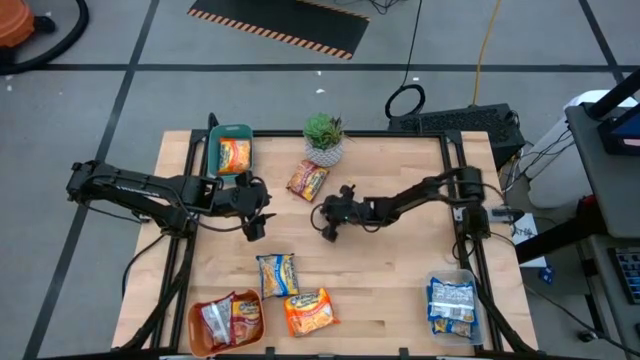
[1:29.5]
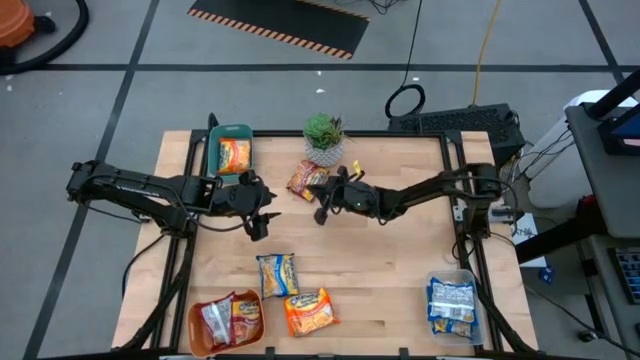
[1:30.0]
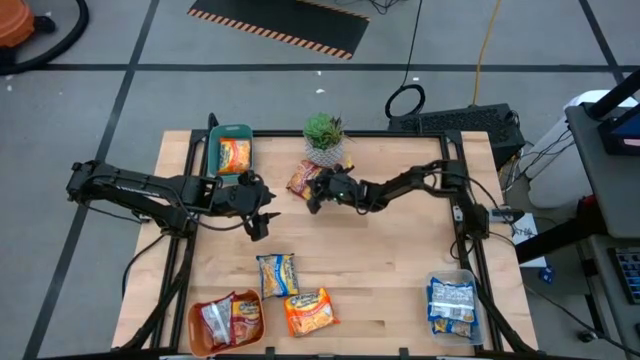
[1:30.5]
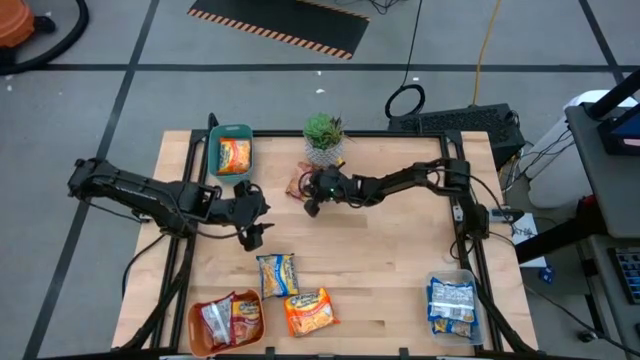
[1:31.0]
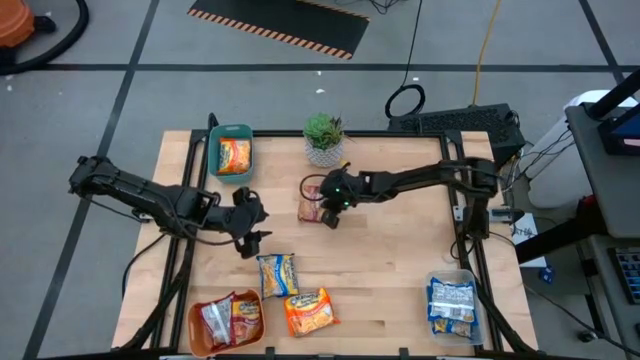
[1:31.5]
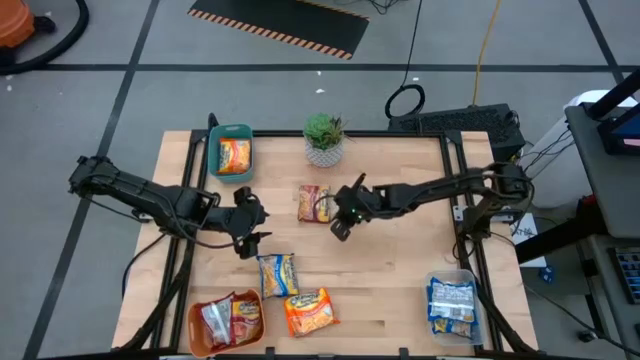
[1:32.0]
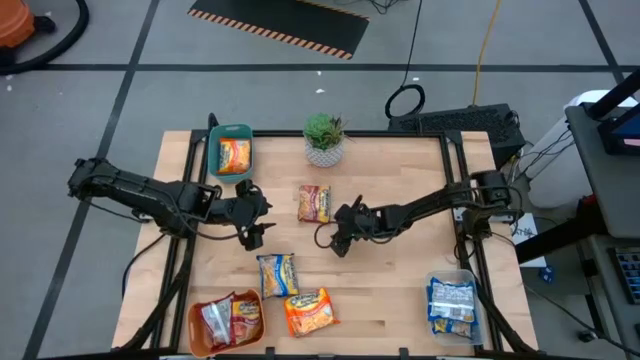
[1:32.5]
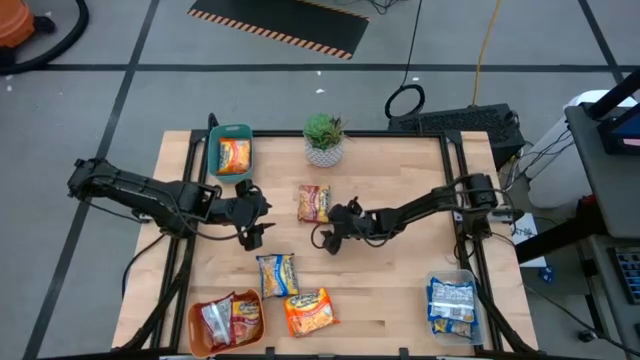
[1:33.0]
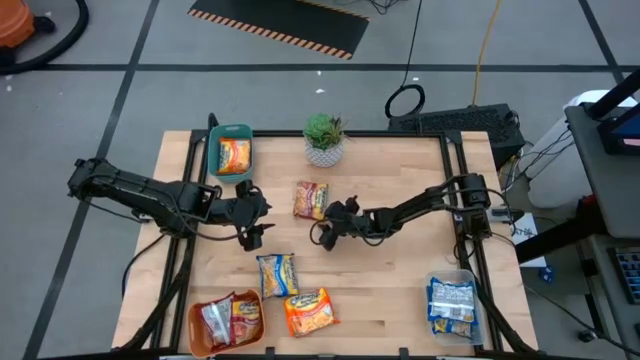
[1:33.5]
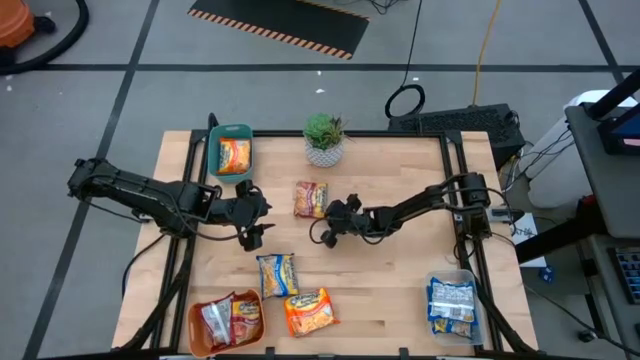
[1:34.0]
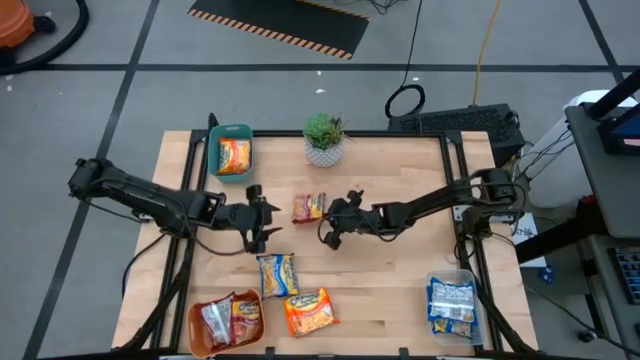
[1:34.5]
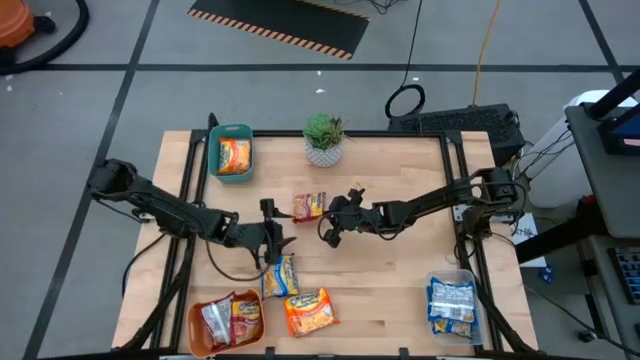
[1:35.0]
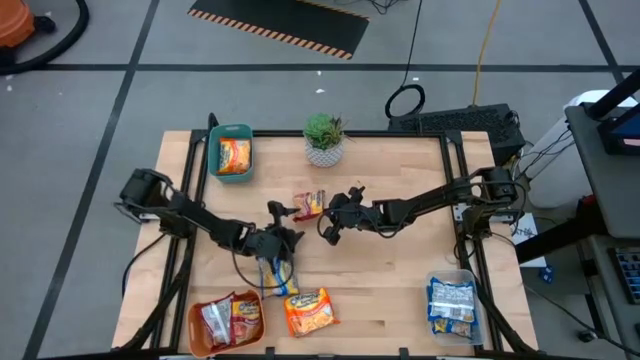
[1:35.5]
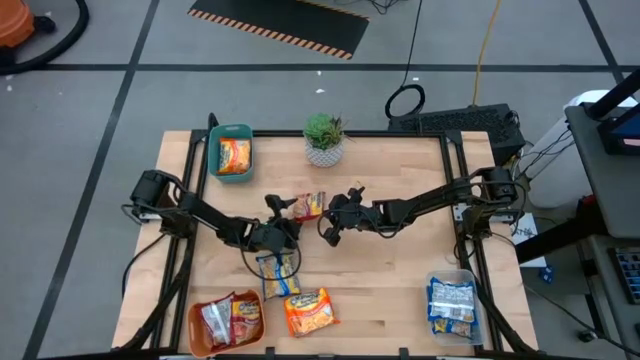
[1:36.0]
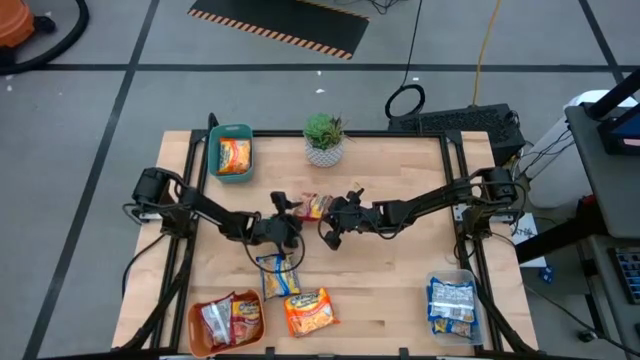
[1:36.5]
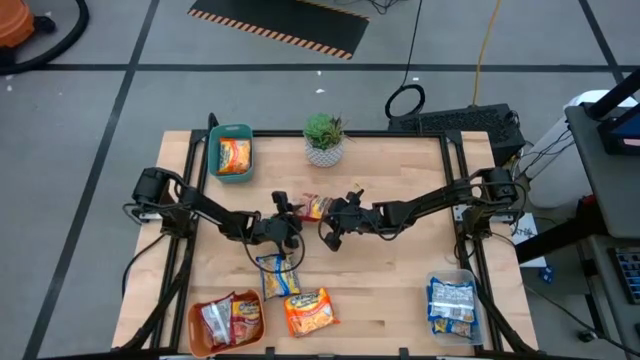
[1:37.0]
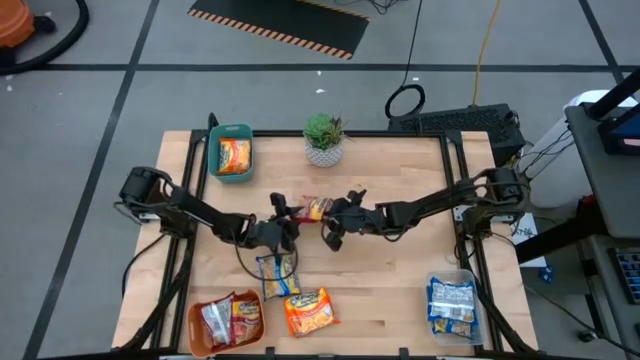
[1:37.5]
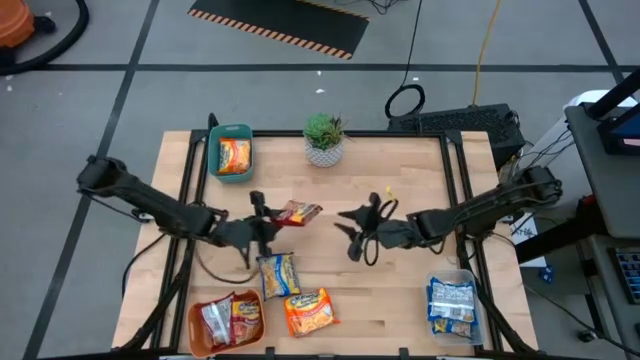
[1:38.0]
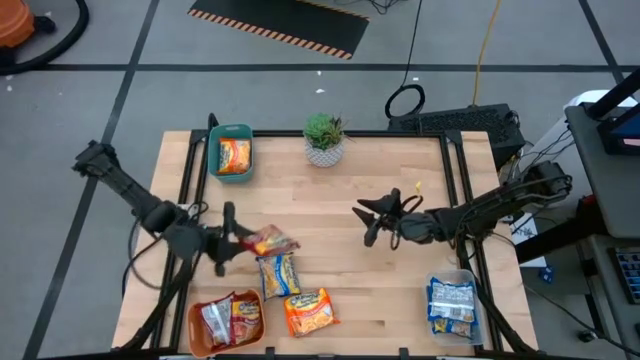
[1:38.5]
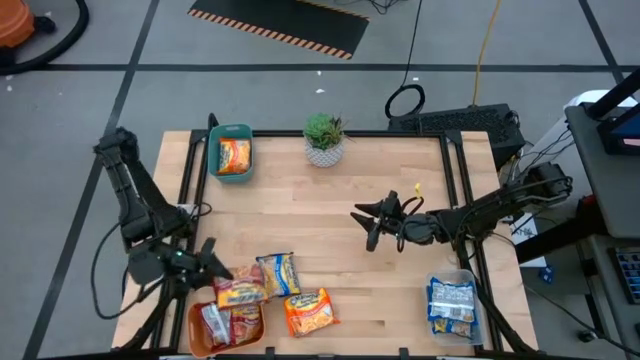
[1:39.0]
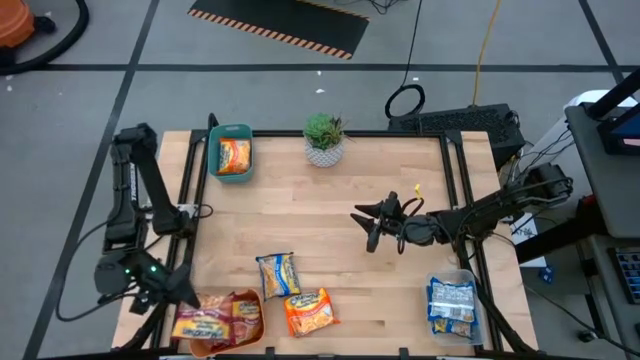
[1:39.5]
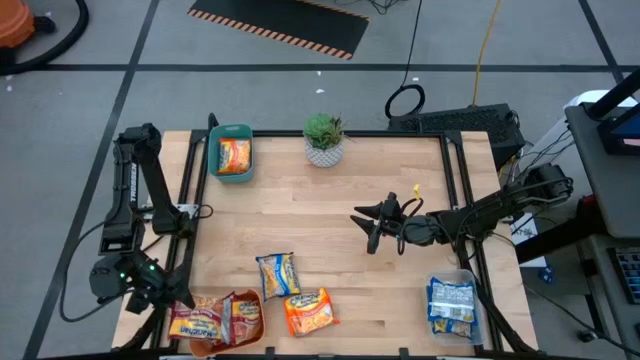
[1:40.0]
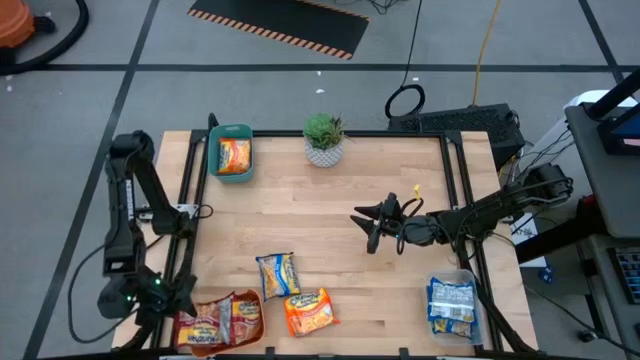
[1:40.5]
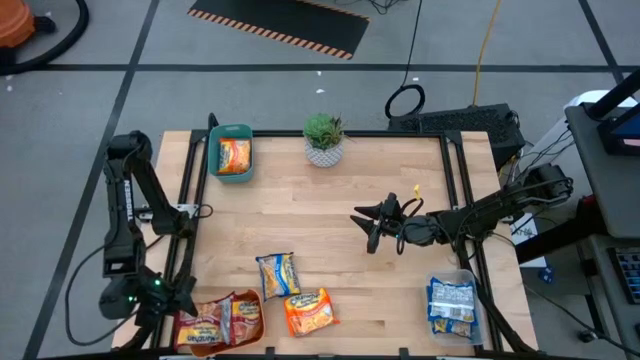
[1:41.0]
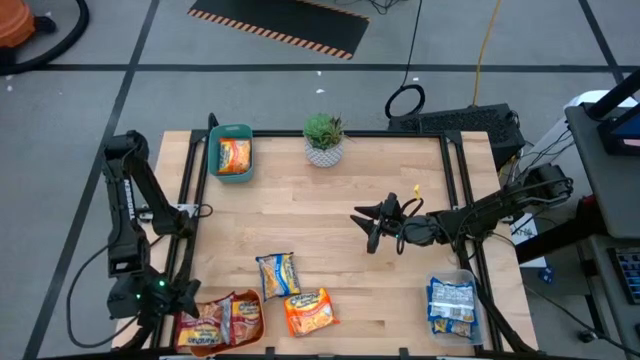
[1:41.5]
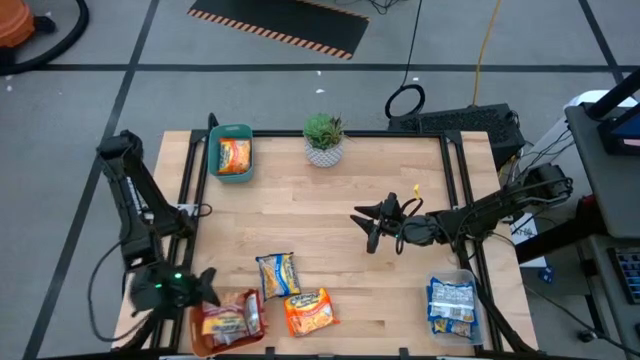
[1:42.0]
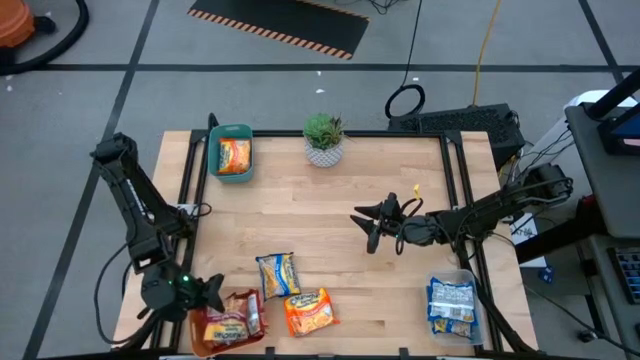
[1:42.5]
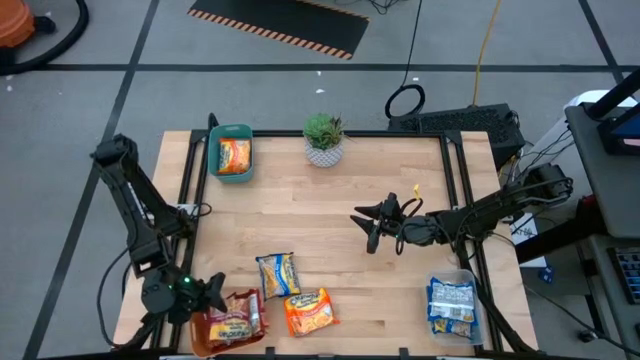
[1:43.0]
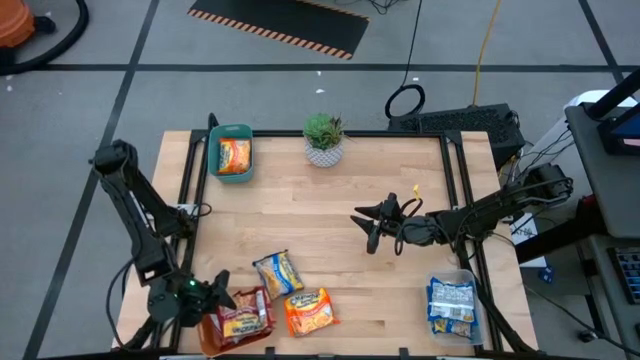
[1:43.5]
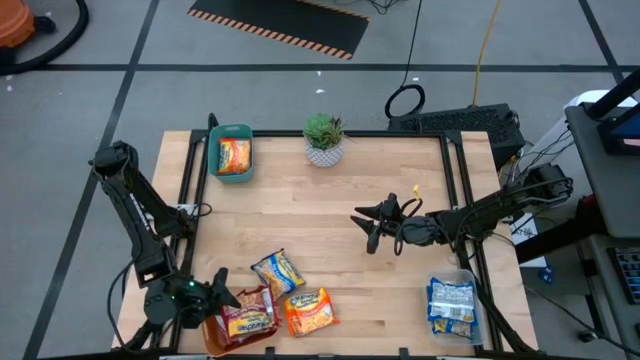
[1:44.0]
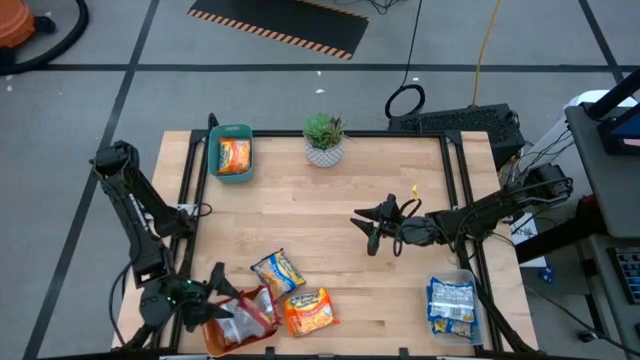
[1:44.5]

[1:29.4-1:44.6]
Task: Sort Maruchan noodles
Put the red noodle pack into the orange bin

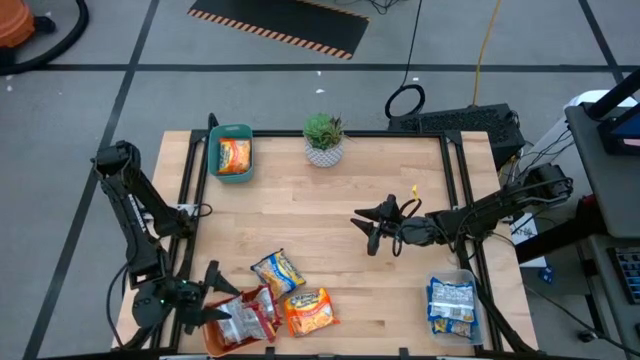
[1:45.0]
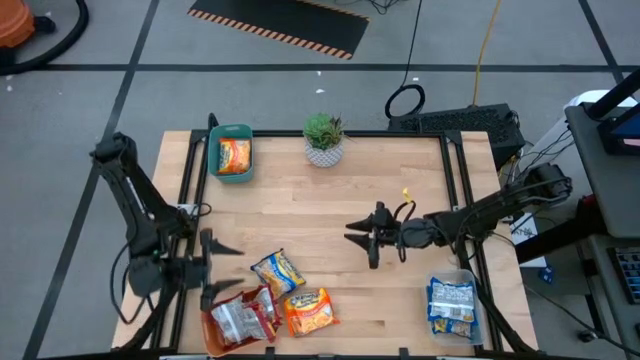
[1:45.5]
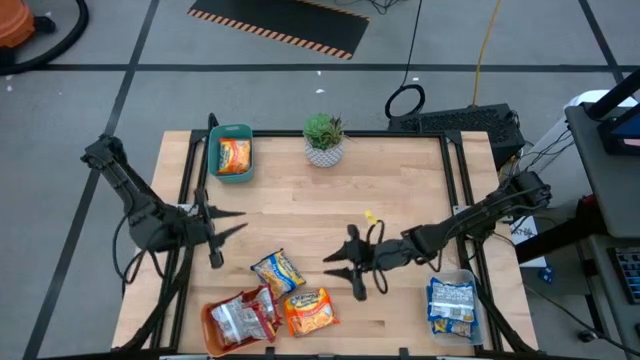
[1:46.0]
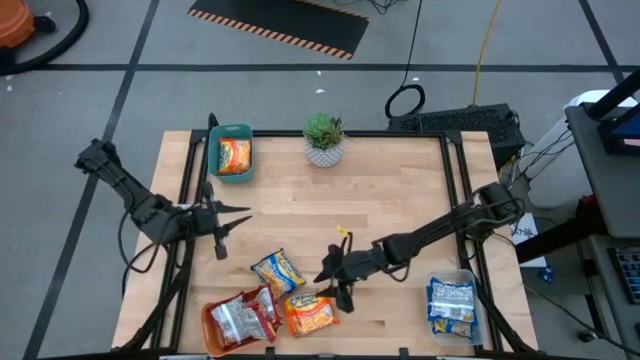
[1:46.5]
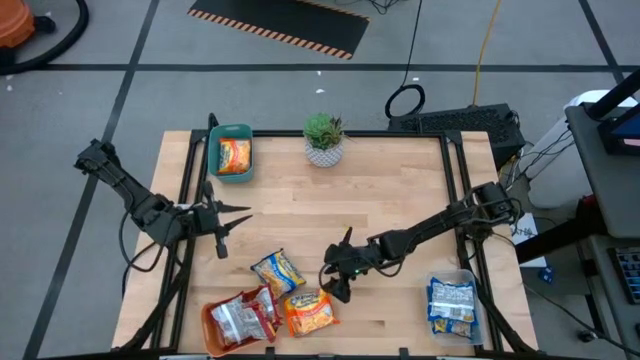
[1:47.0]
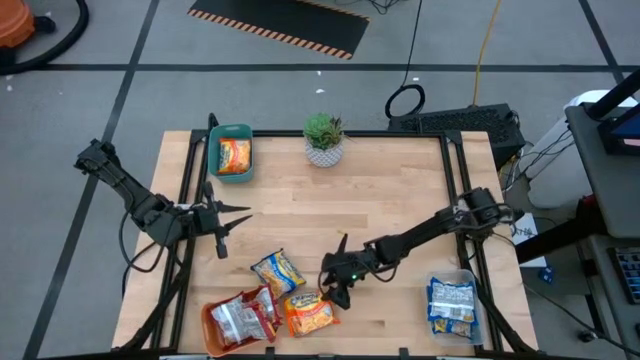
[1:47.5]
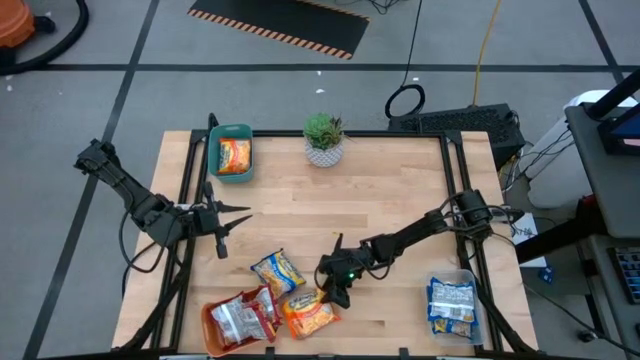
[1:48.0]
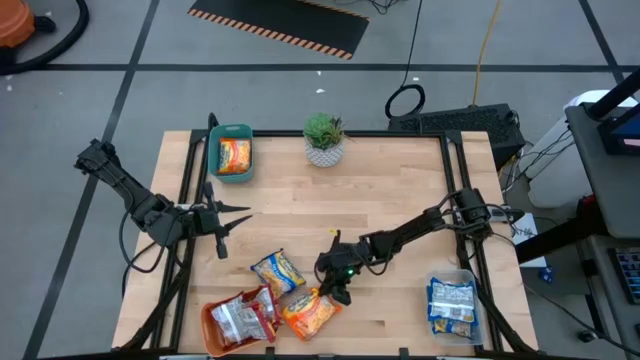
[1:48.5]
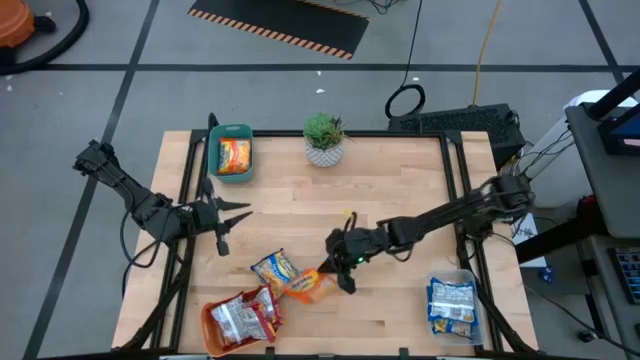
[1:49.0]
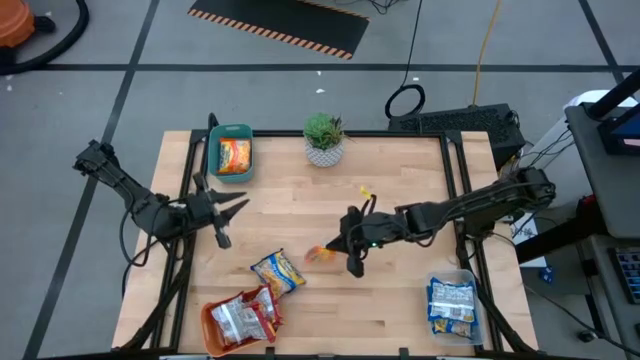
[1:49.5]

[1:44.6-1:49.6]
Put the orange noodle pack into the blue bin
